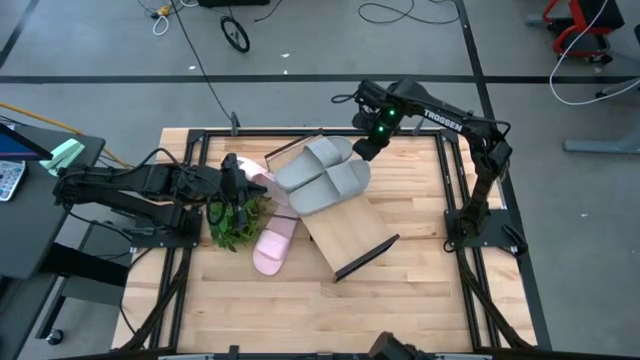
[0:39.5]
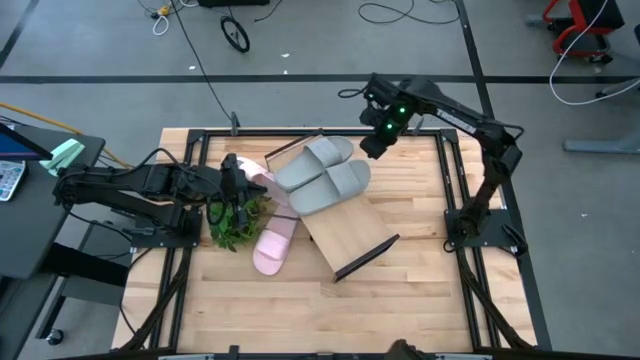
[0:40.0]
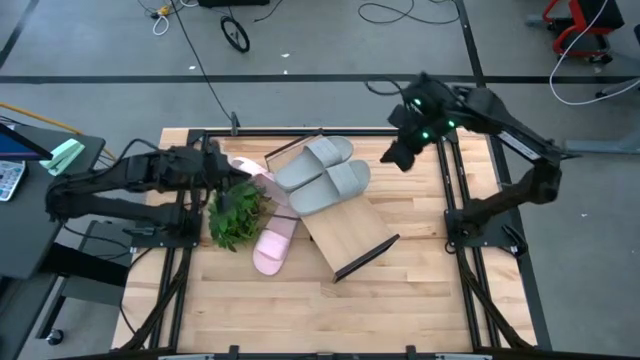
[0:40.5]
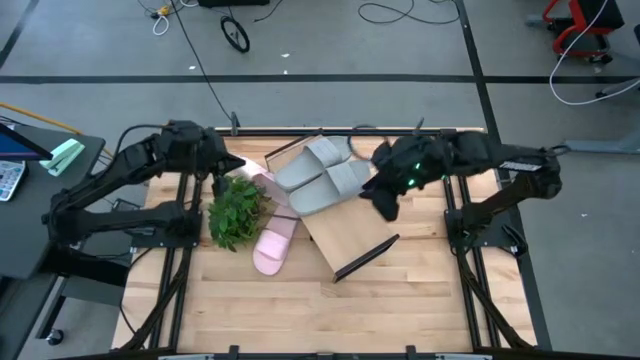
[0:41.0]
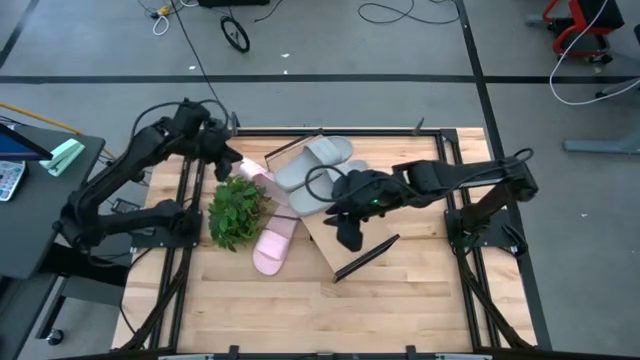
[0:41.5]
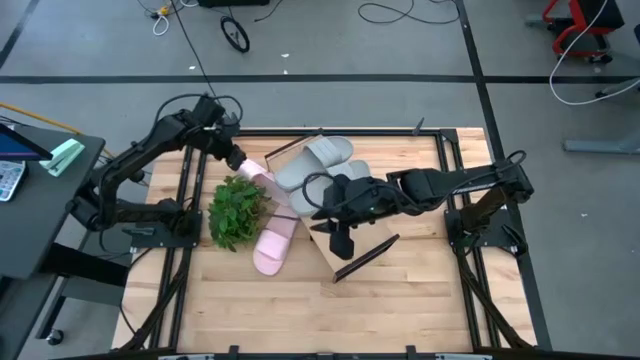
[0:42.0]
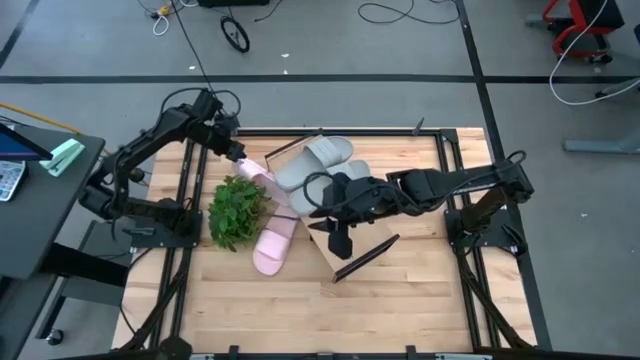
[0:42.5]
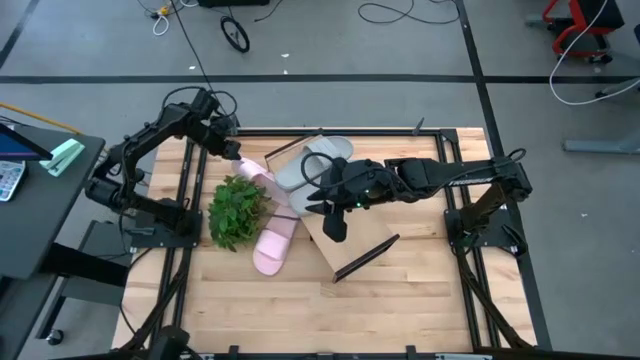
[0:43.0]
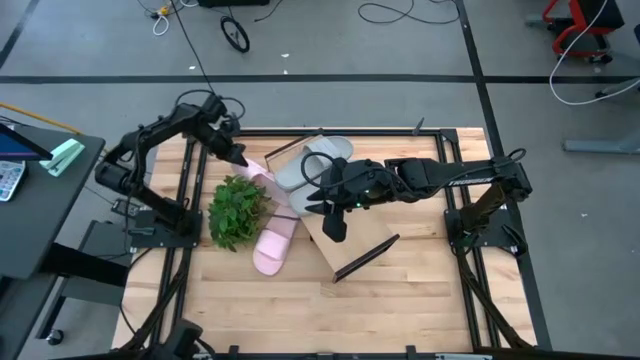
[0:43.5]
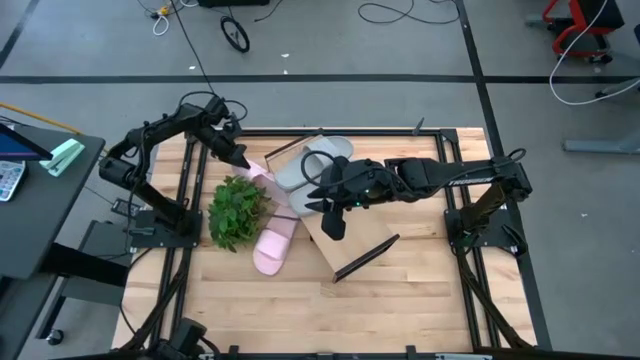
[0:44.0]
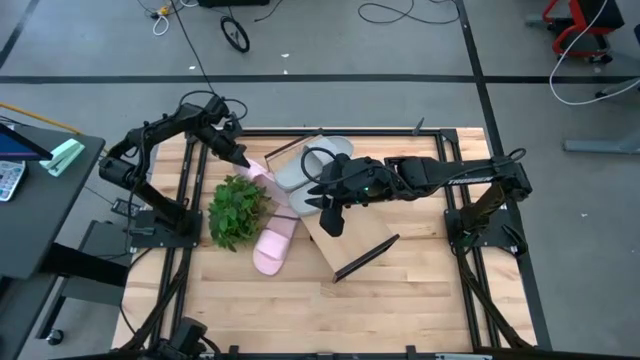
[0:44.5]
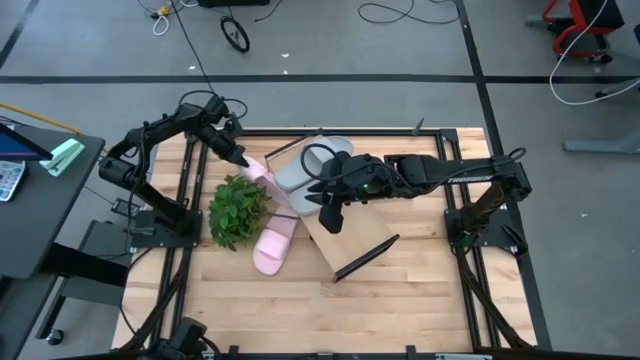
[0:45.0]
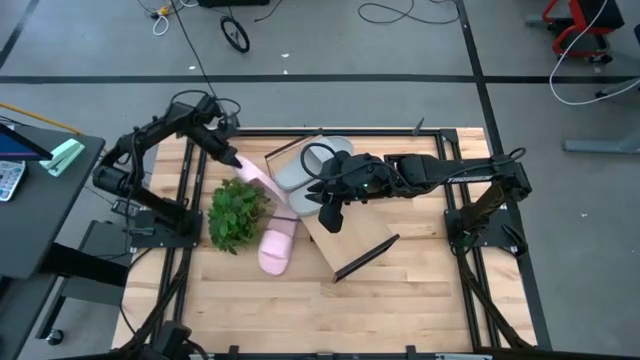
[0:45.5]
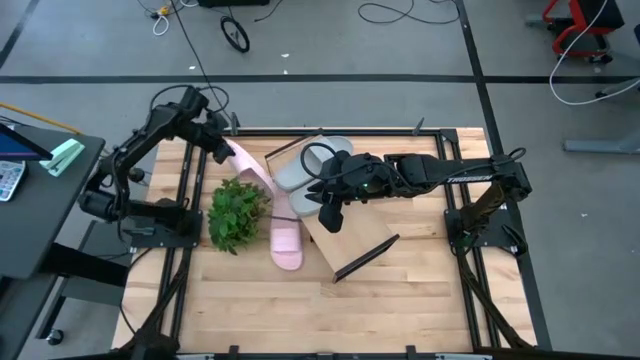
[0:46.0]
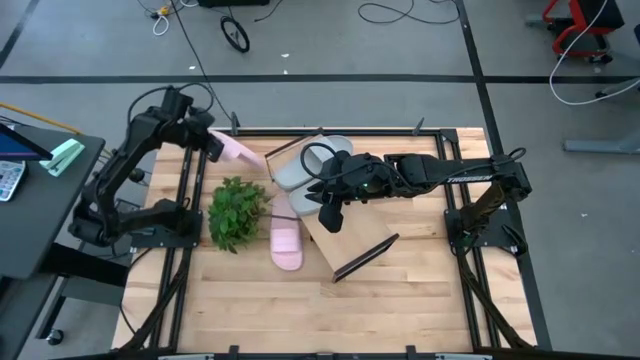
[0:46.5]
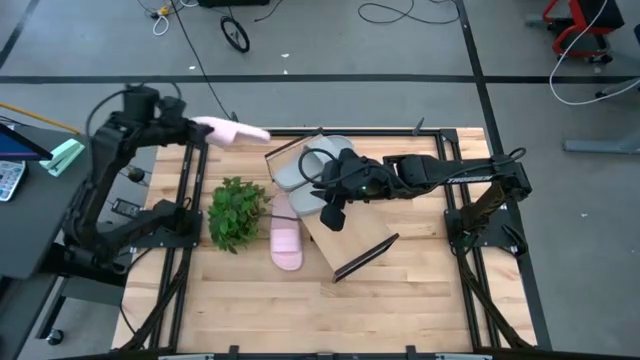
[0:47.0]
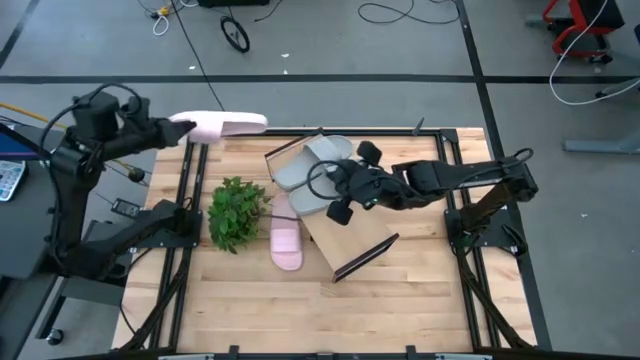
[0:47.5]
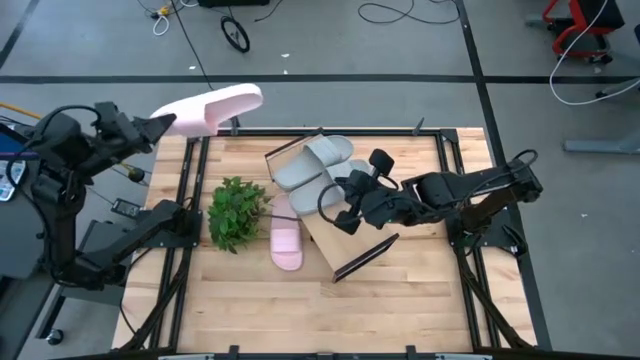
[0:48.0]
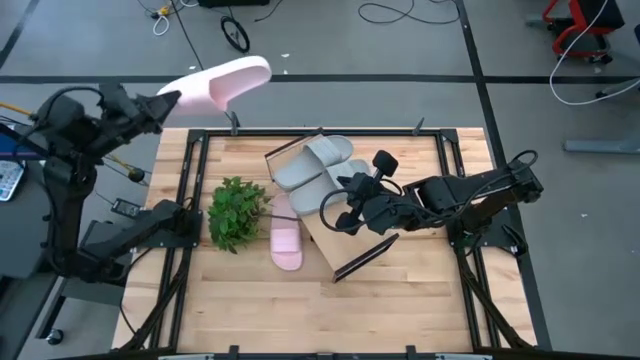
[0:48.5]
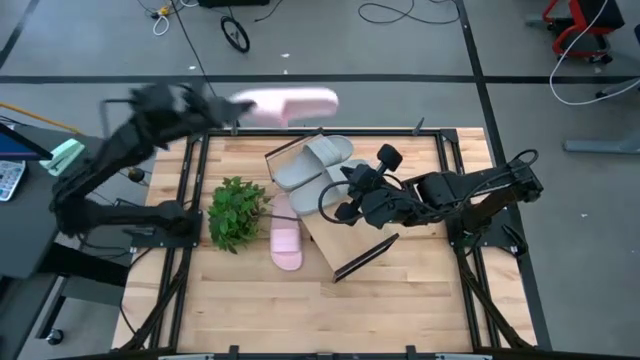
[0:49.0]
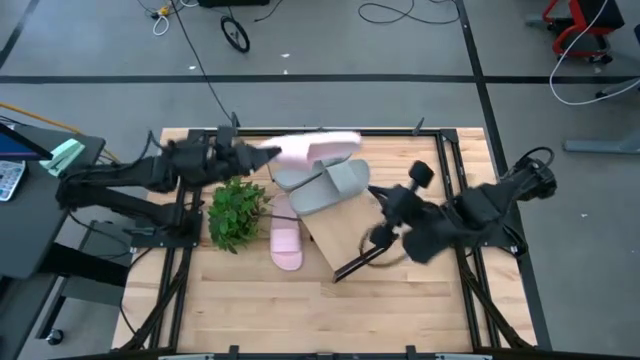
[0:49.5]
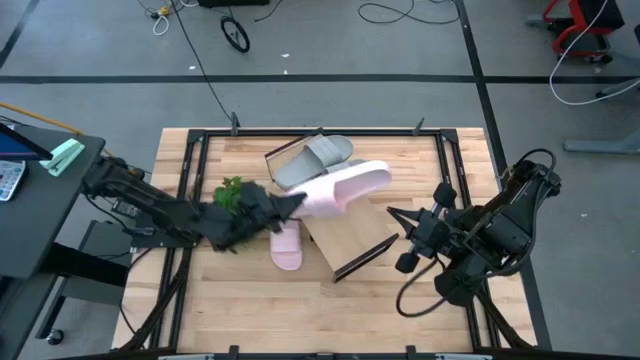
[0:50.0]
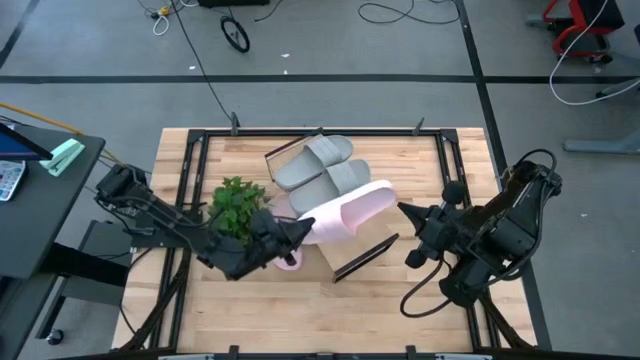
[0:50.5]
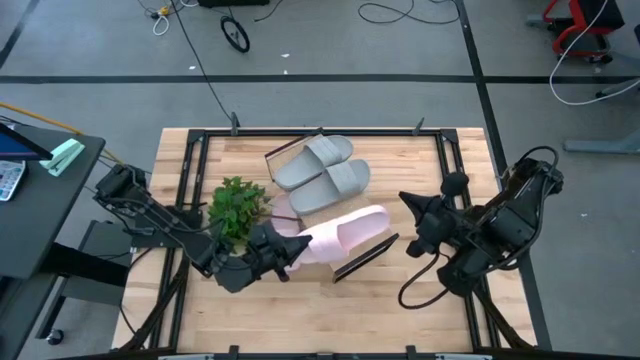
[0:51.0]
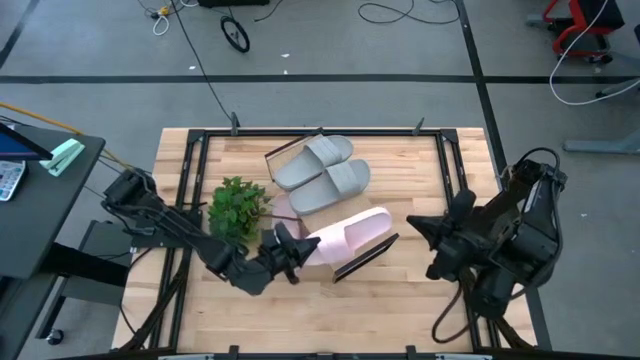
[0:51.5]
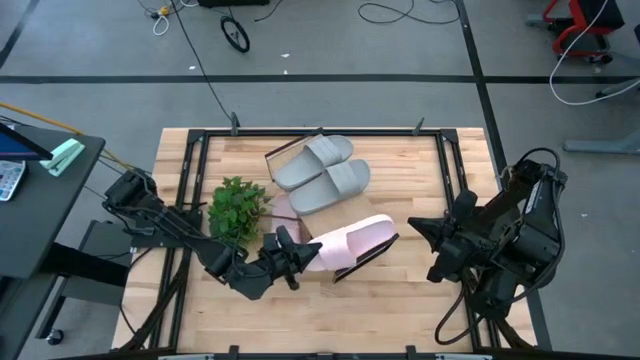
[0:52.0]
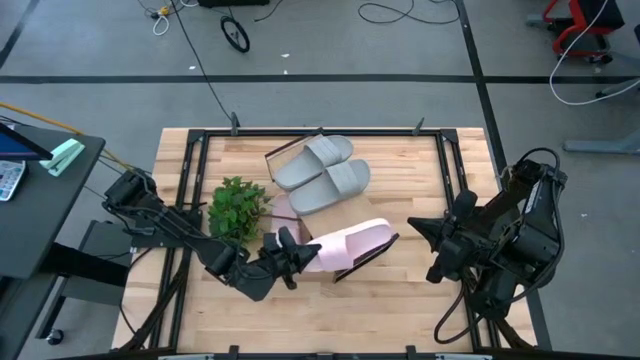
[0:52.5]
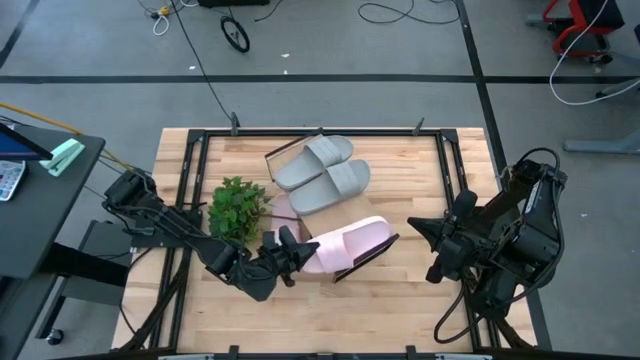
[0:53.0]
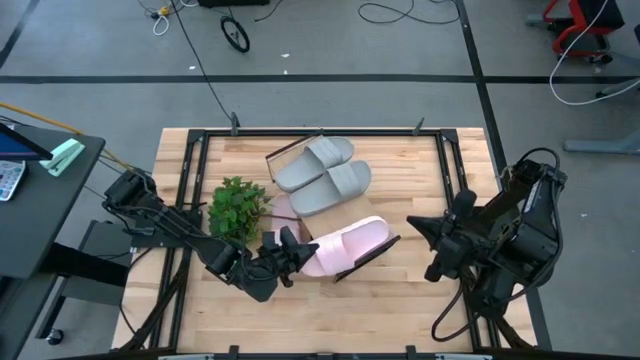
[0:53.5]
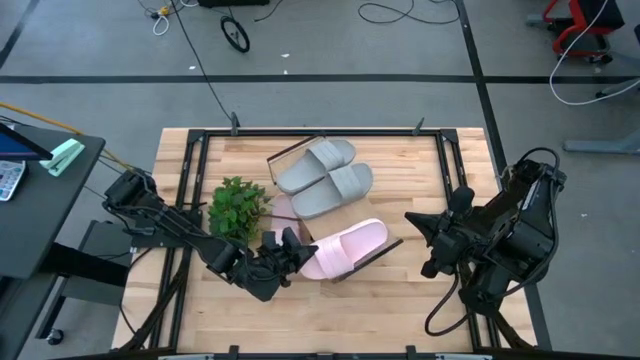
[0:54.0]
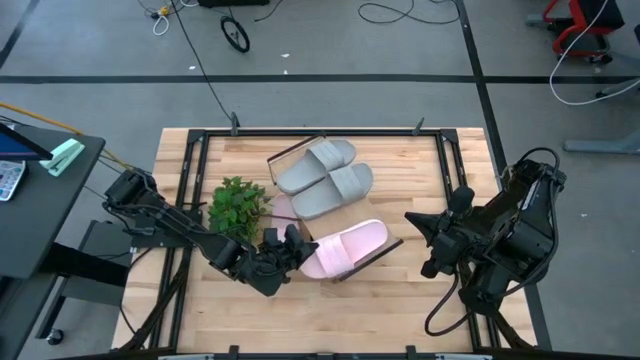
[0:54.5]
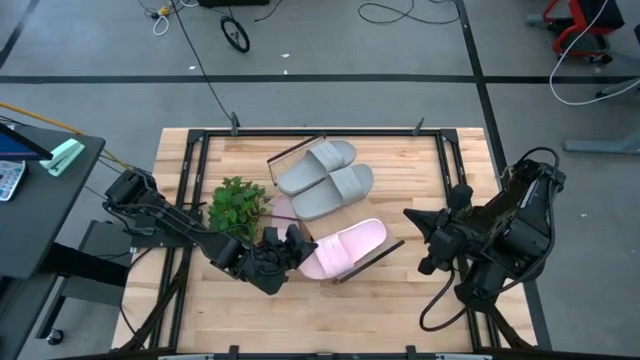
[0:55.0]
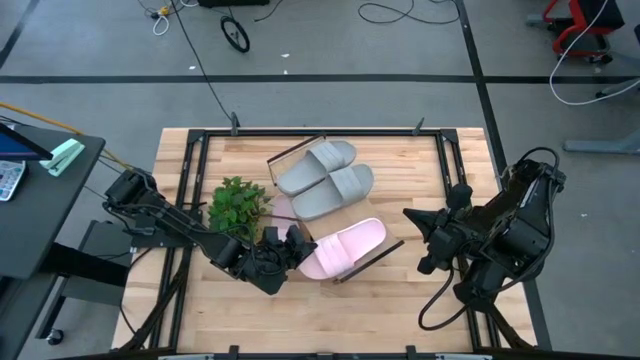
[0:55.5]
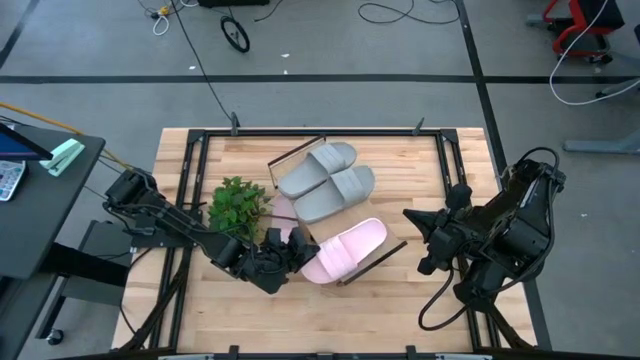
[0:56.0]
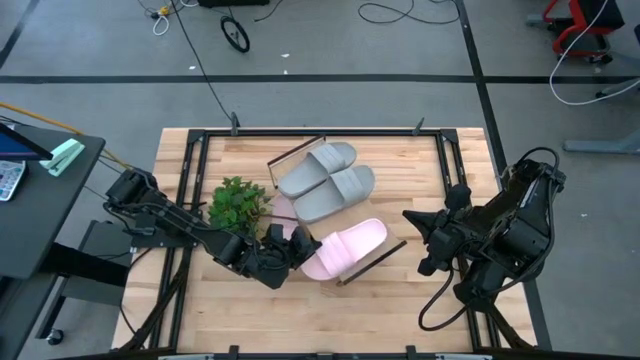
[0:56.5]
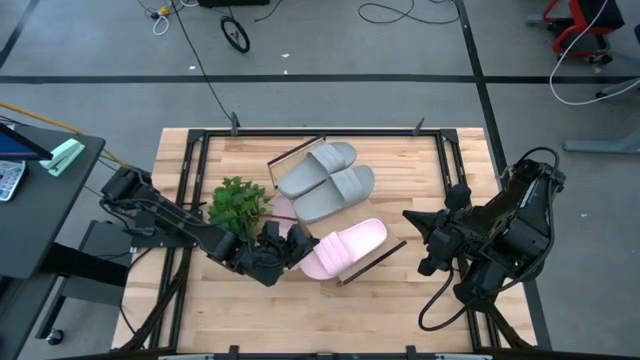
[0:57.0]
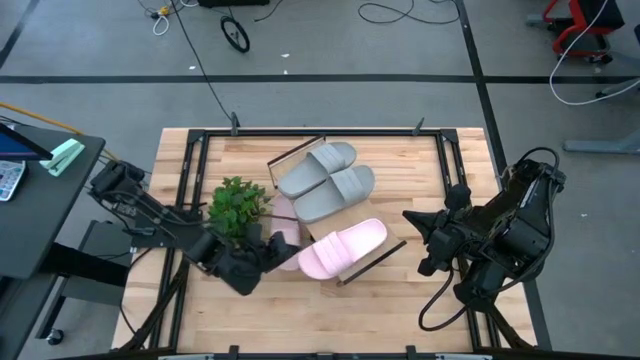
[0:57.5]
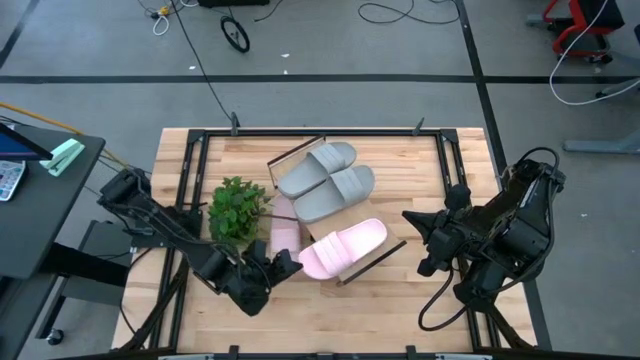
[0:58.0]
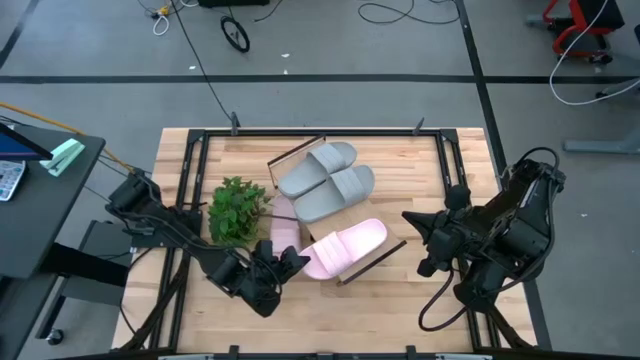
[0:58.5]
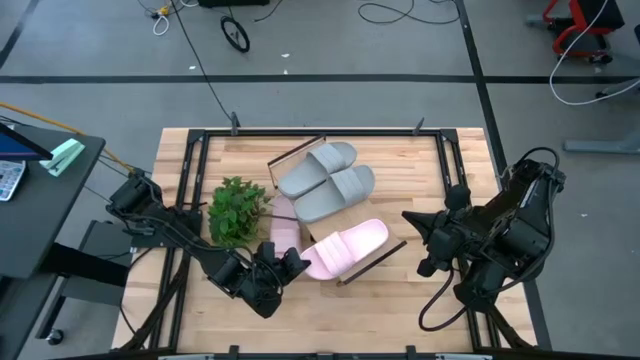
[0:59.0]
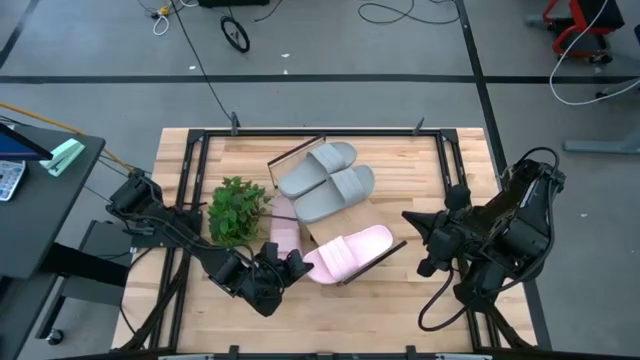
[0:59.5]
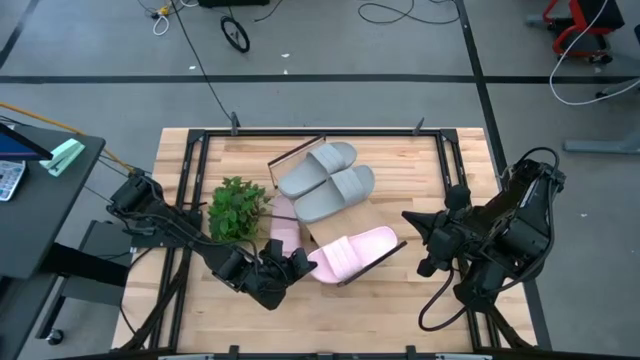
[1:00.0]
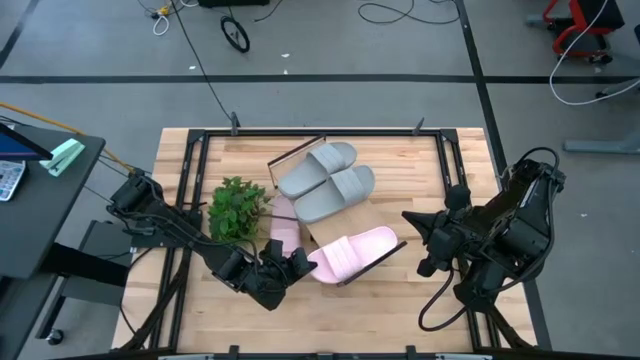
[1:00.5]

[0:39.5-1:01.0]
Task: Pick and place slides into the shelf
Put the top pink slide on the shelf
